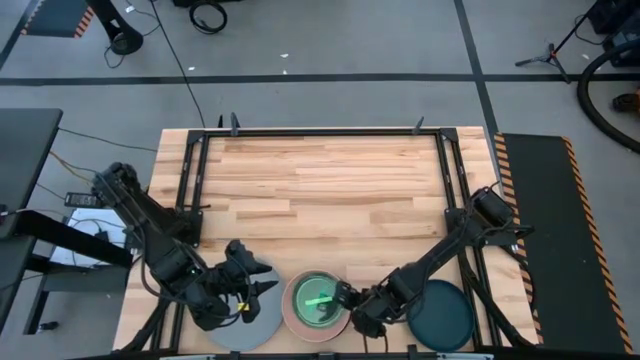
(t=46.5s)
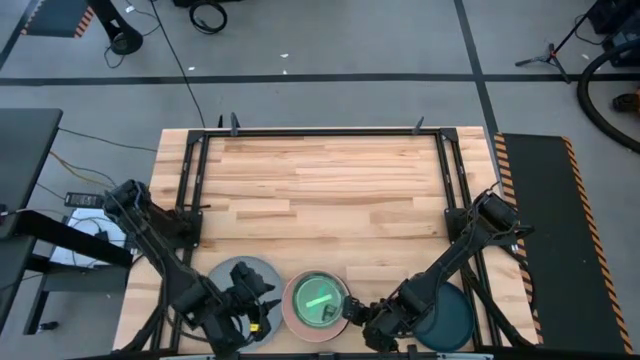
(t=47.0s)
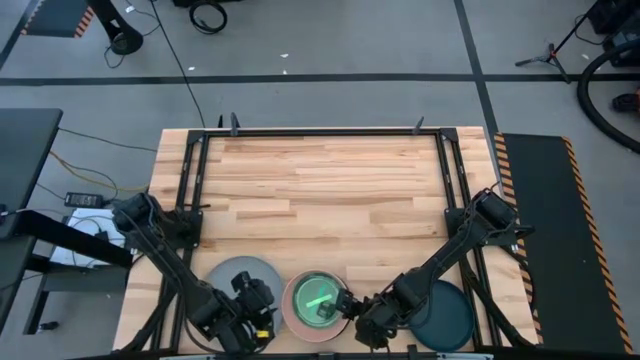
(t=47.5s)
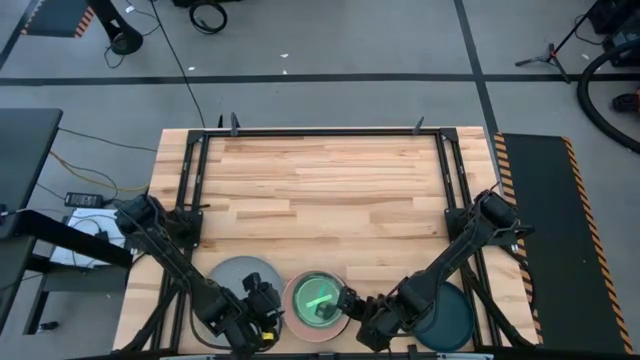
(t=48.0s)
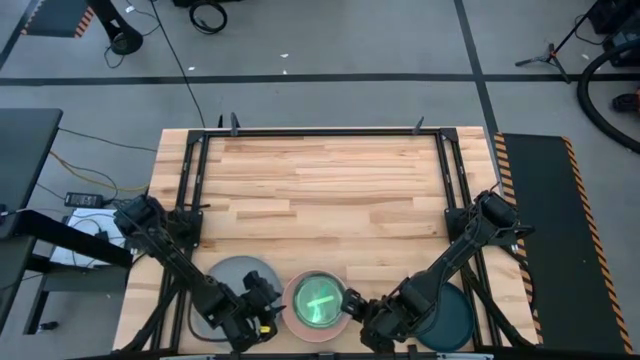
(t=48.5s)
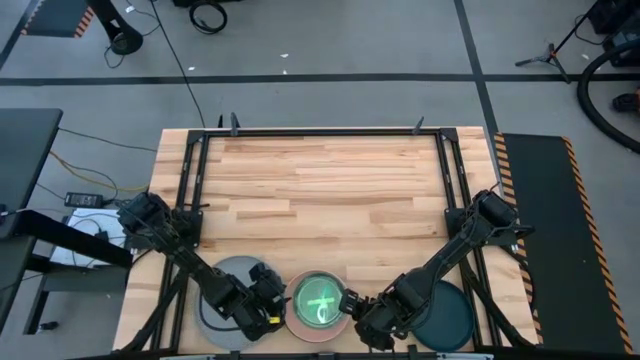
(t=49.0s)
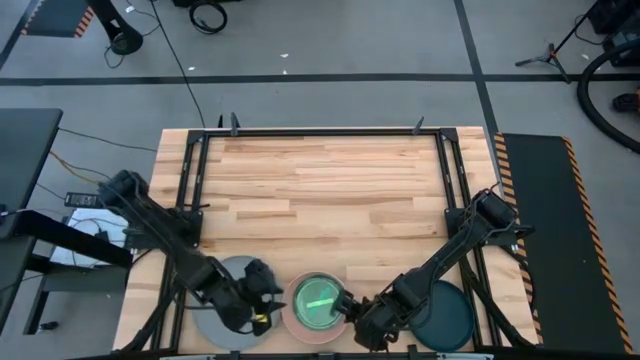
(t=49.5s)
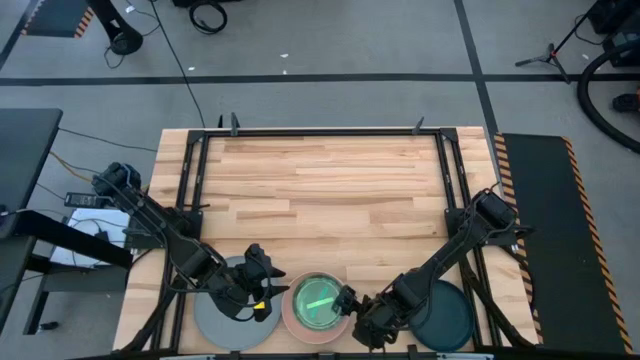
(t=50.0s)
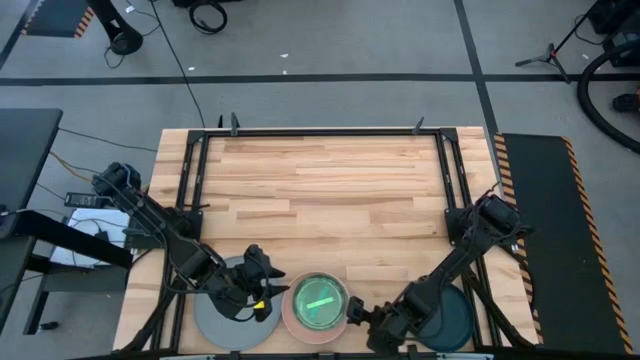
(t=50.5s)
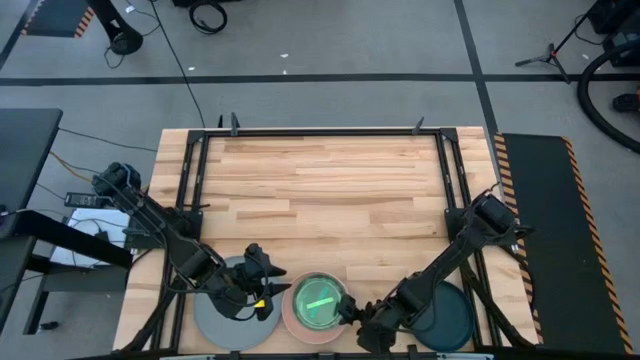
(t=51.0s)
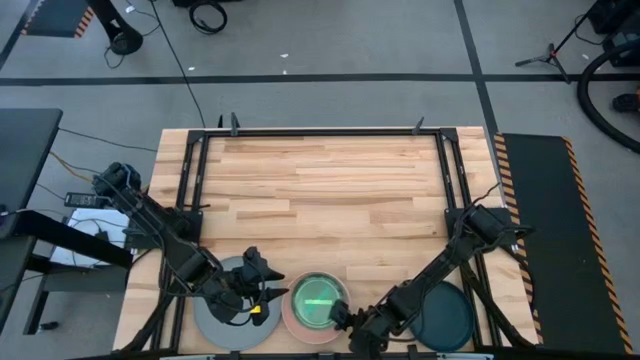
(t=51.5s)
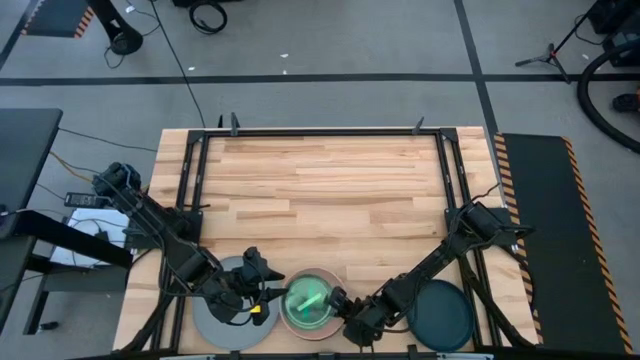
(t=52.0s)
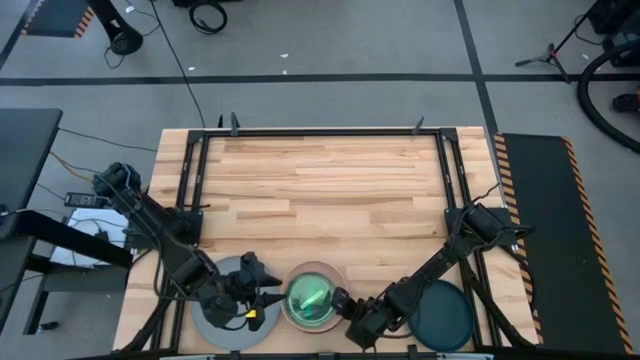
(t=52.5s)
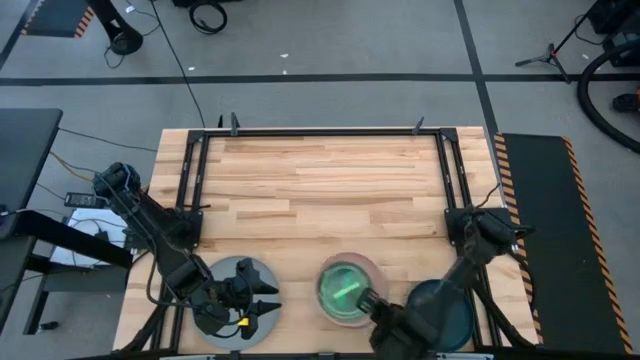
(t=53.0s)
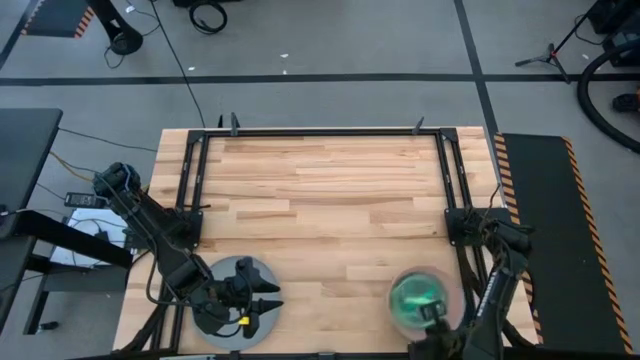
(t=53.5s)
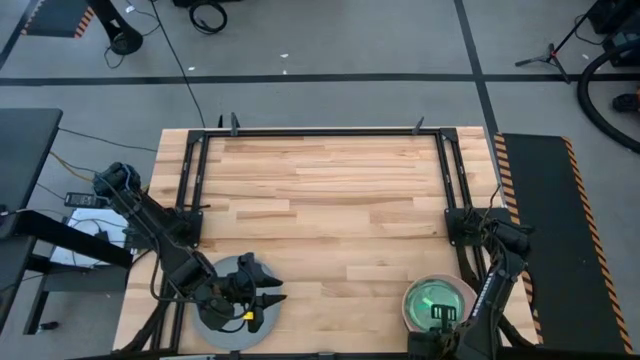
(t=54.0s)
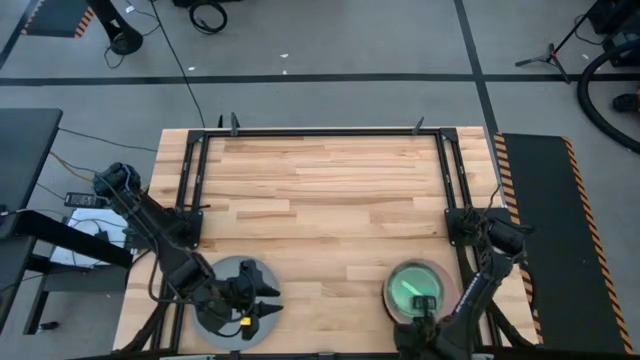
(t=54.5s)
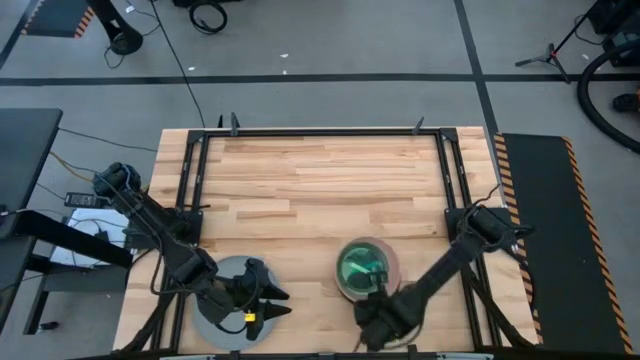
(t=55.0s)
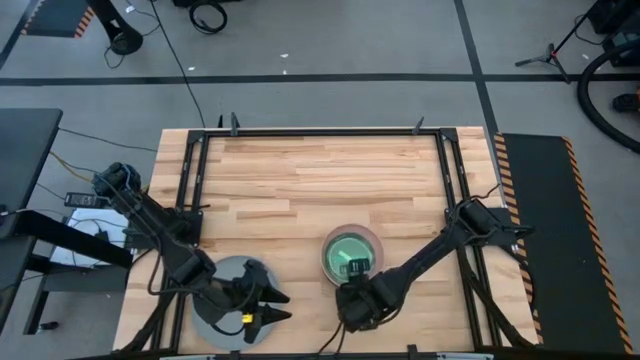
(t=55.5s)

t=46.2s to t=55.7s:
Task: Stack plastic plates
Stack the stacked plates on top of the dark blue plate

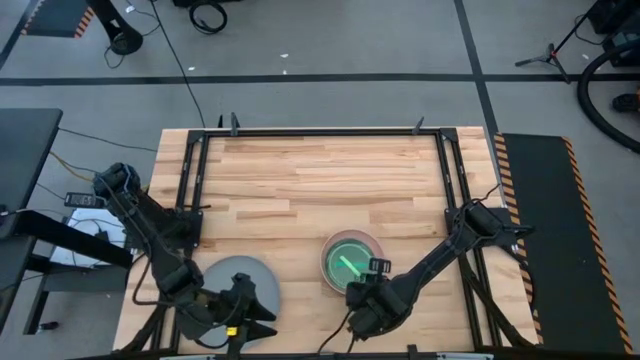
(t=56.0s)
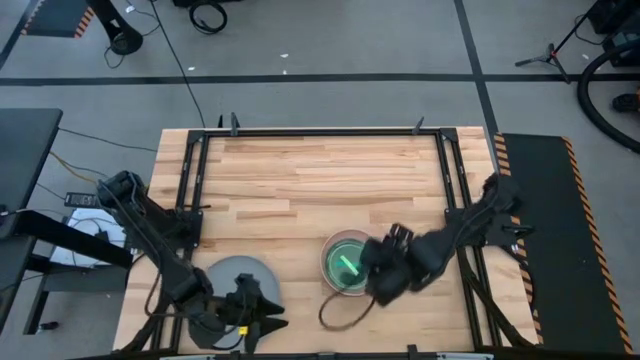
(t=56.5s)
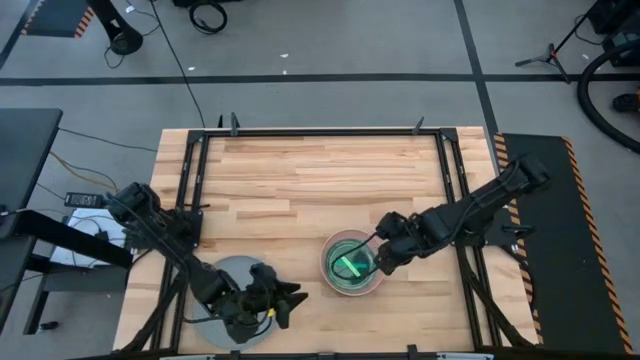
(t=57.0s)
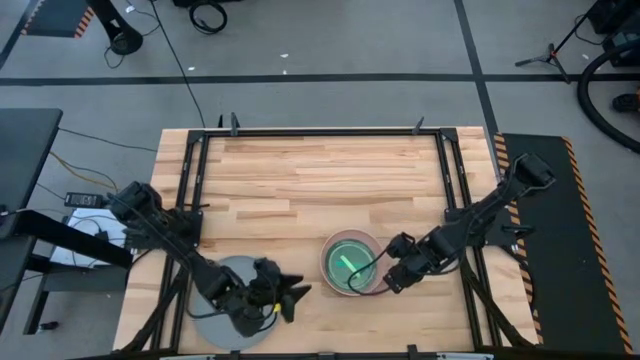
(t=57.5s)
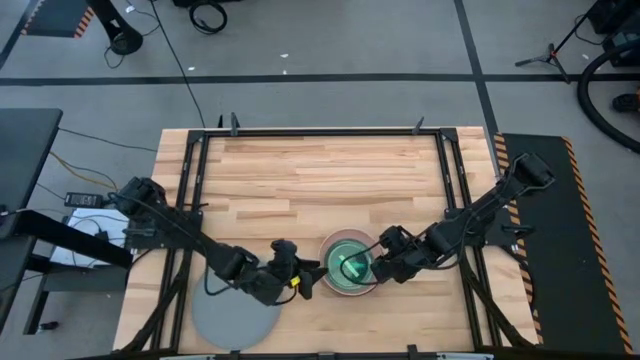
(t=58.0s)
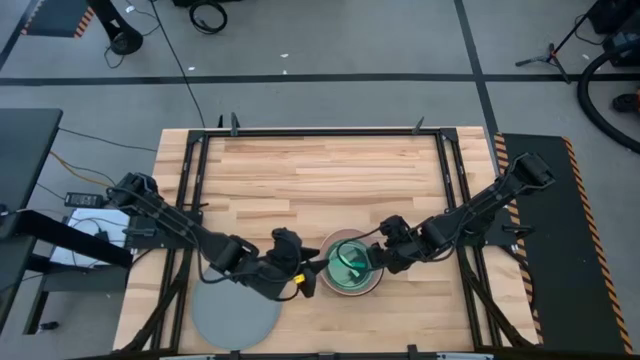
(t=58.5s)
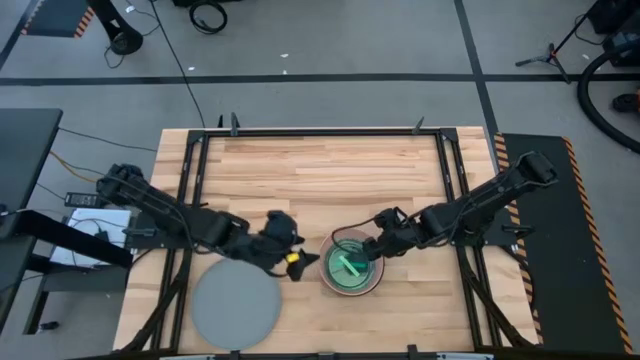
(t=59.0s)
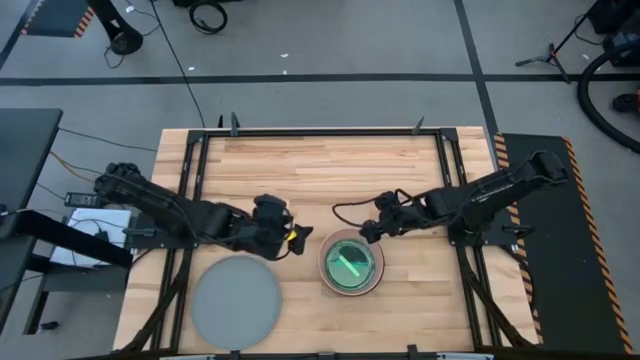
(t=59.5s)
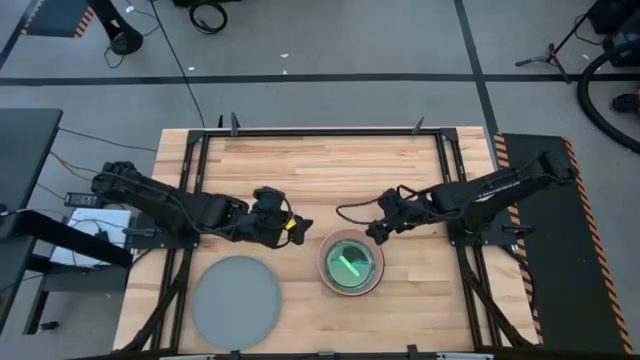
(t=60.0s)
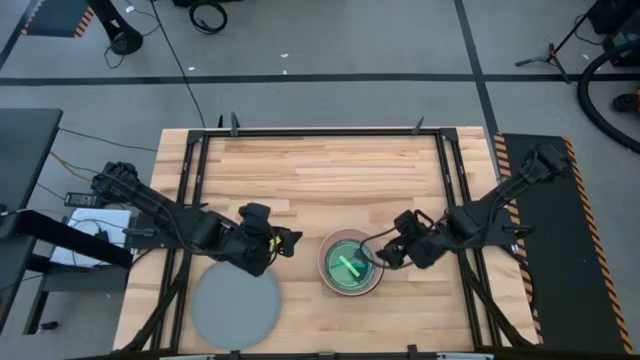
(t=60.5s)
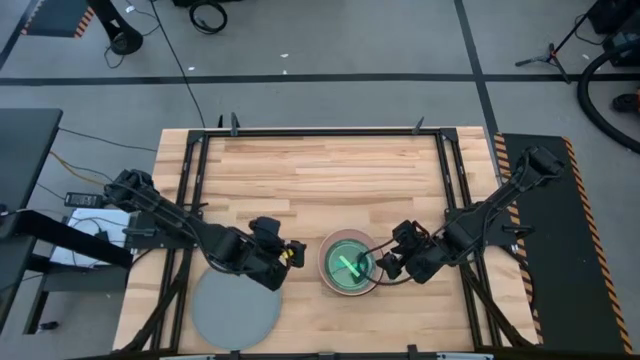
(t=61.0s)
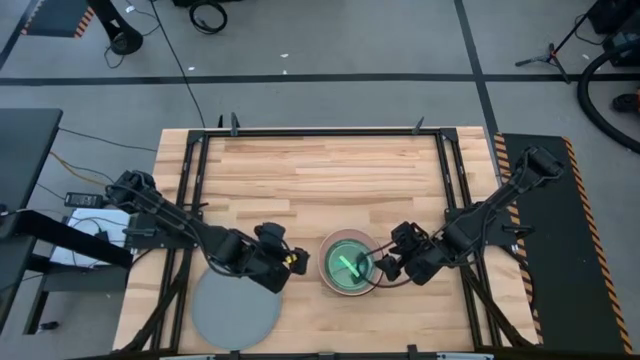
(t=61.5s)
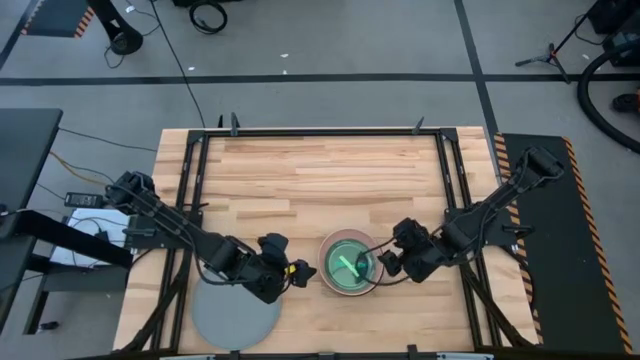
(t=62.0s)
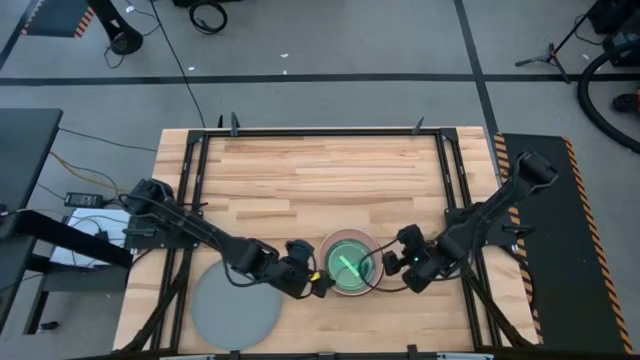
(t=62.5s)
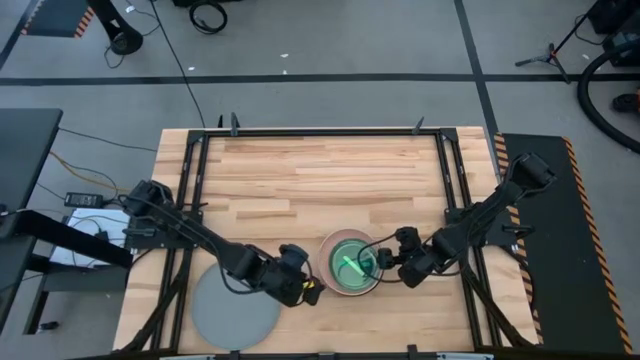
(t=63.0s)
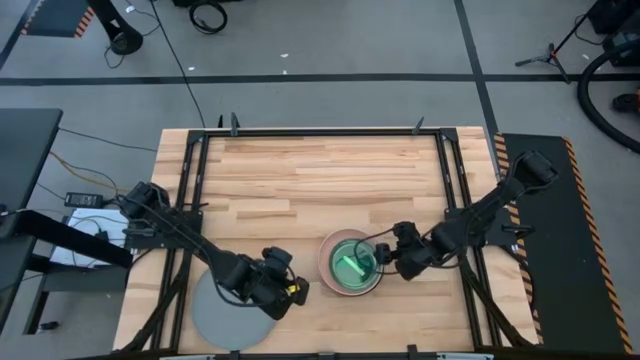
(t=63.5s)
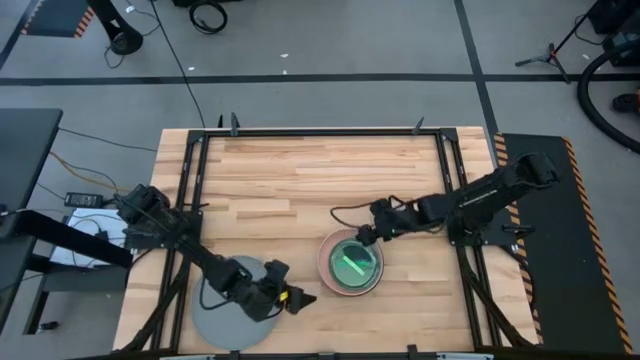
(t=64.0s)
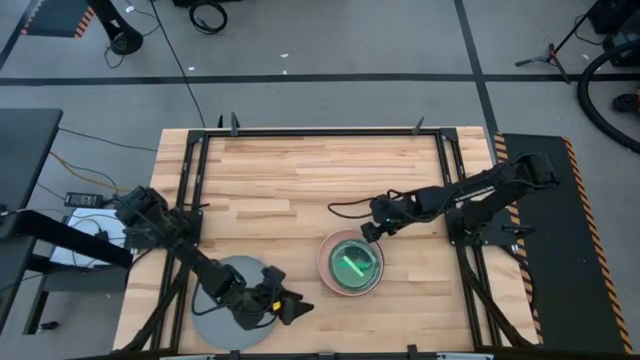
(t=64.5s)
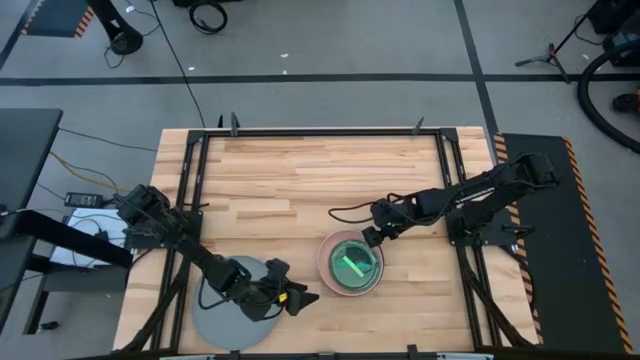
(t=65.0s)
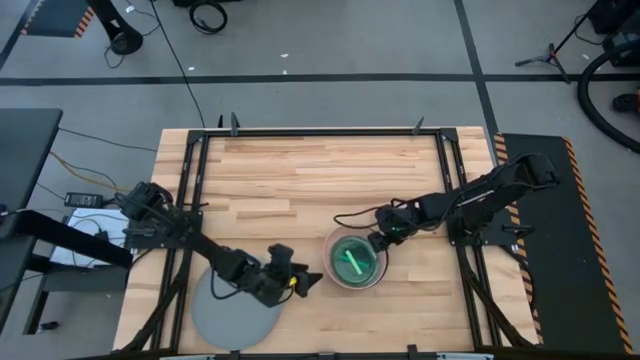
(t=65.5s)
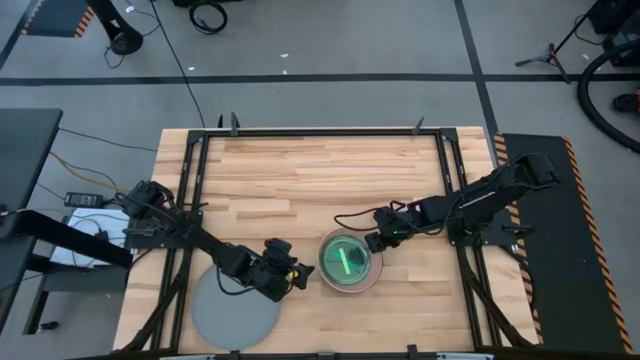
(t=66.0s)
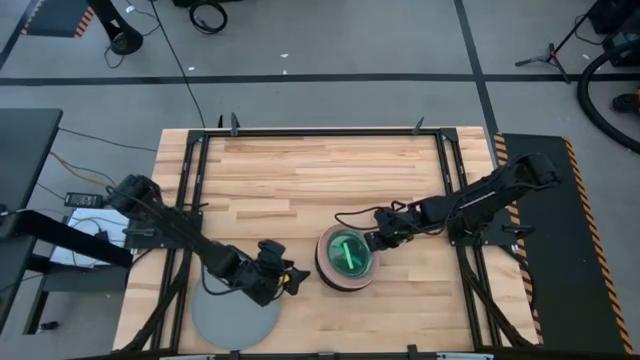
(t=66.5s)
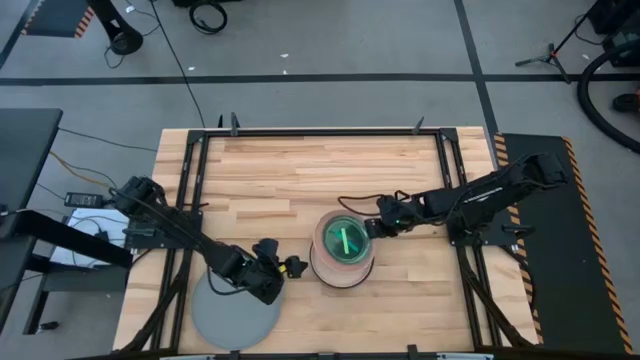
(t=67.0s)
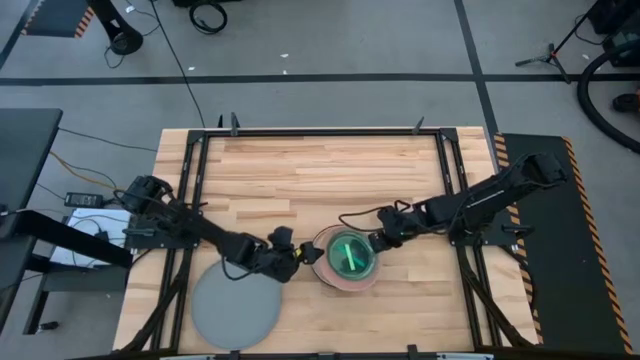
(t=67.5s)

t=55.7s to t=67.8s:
Stack the stacked plates on top of the gray plate
